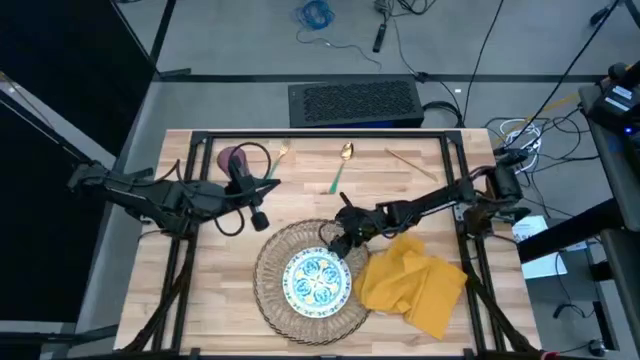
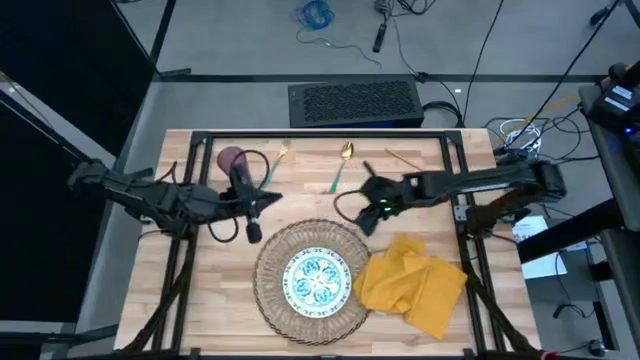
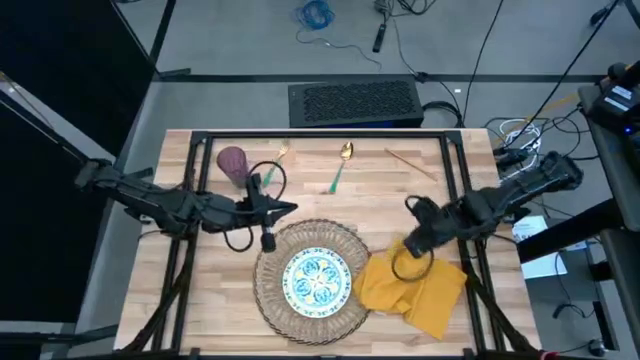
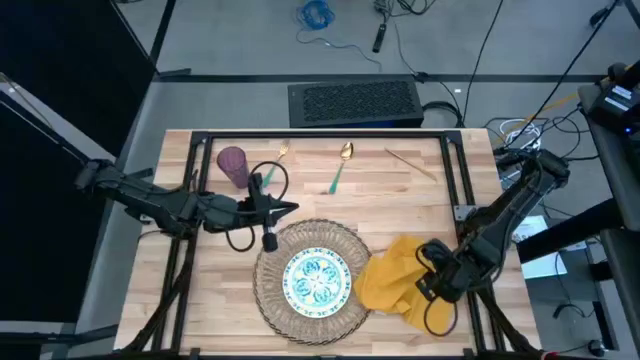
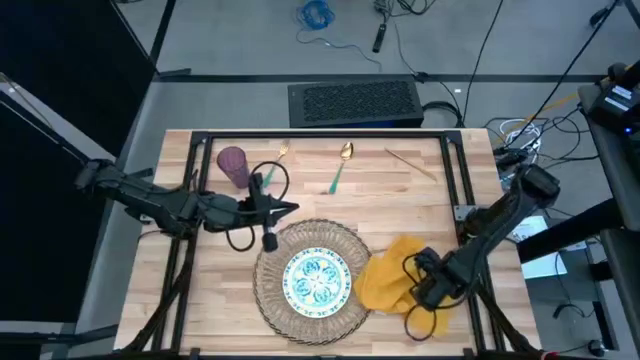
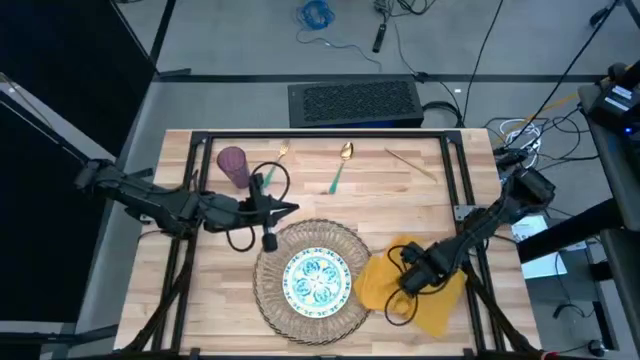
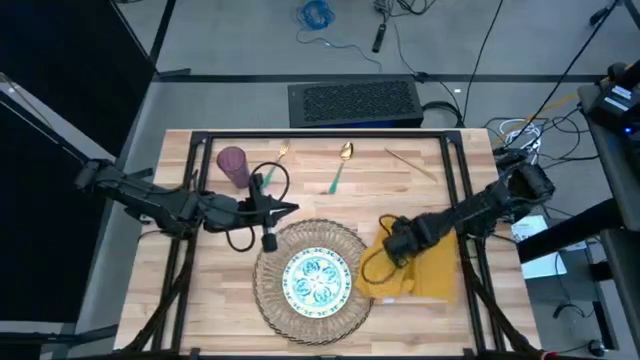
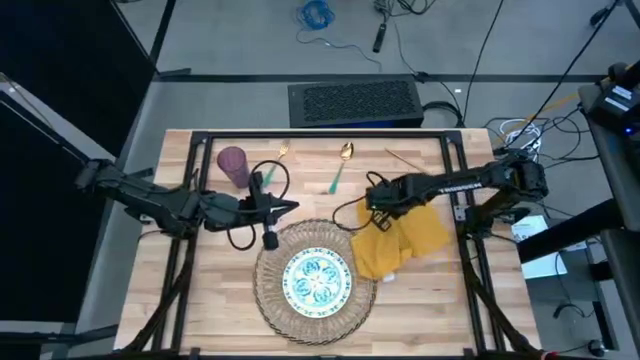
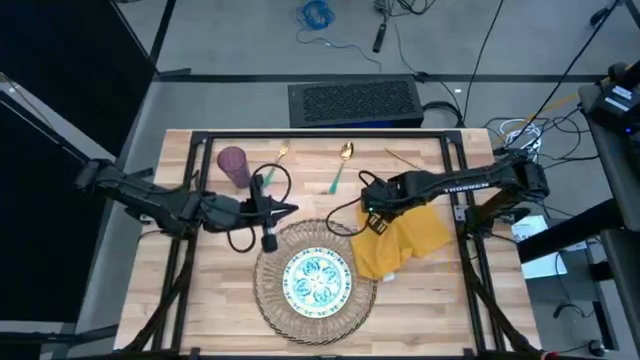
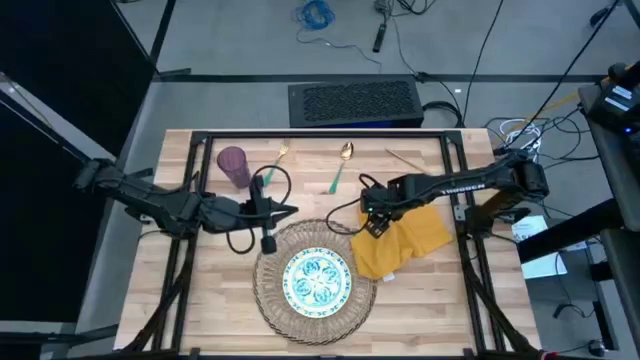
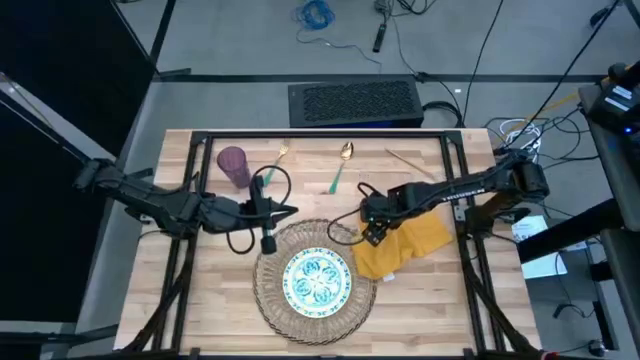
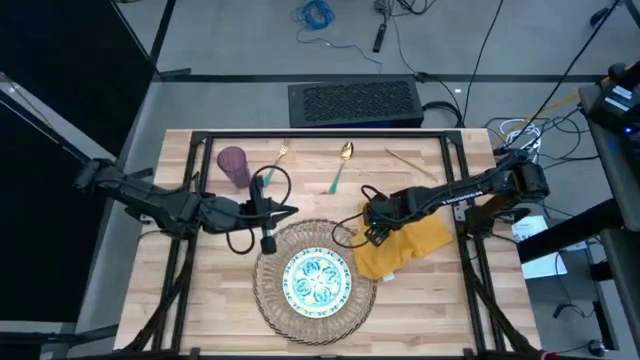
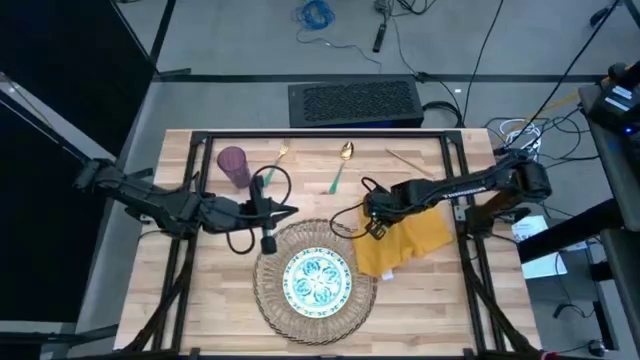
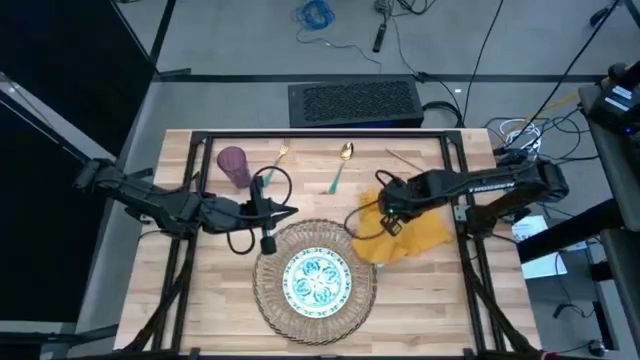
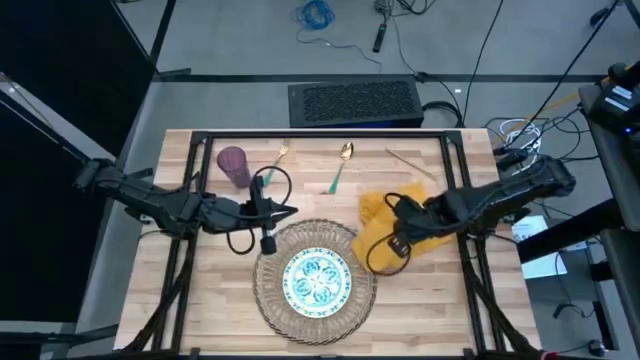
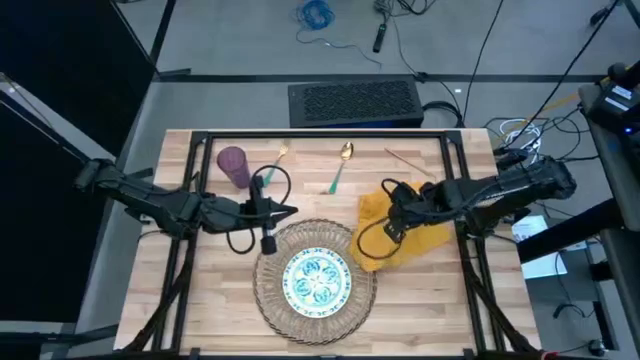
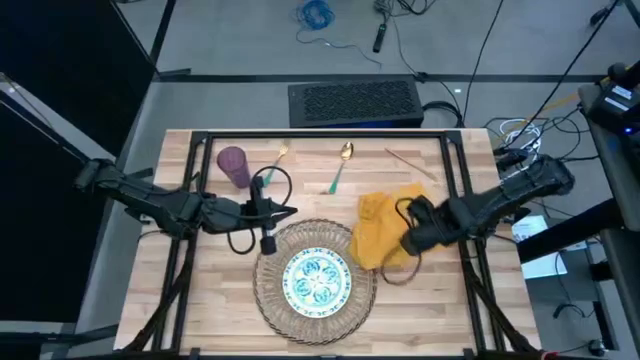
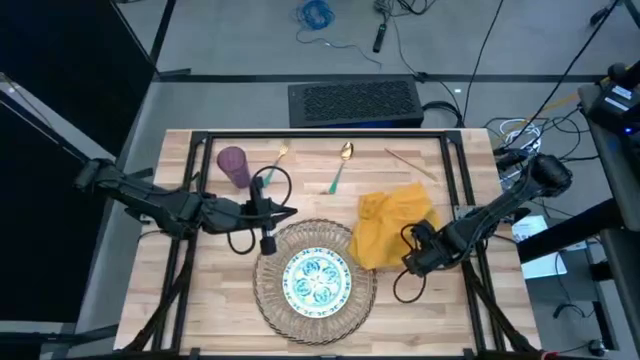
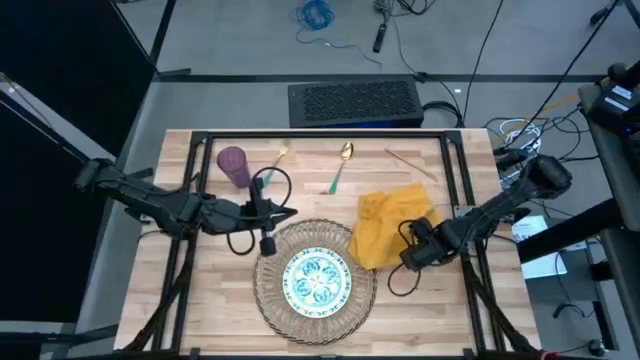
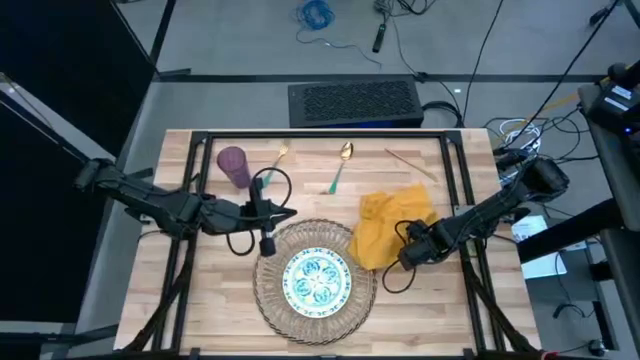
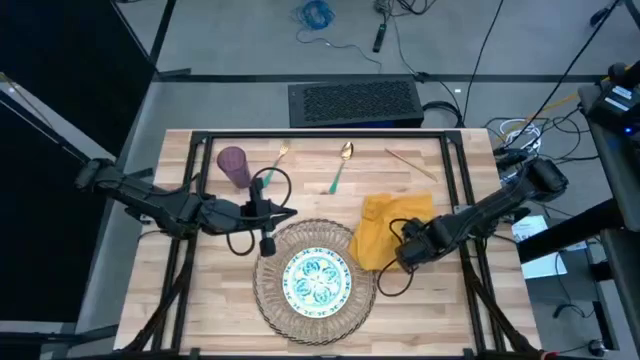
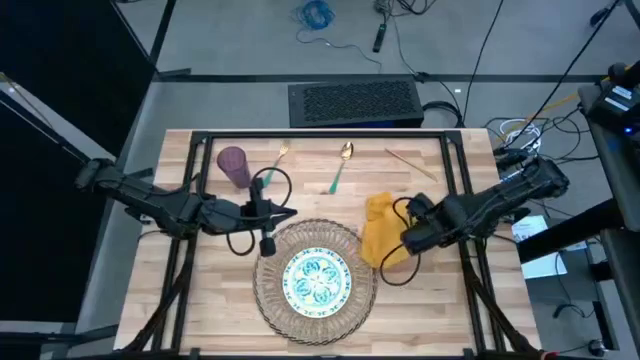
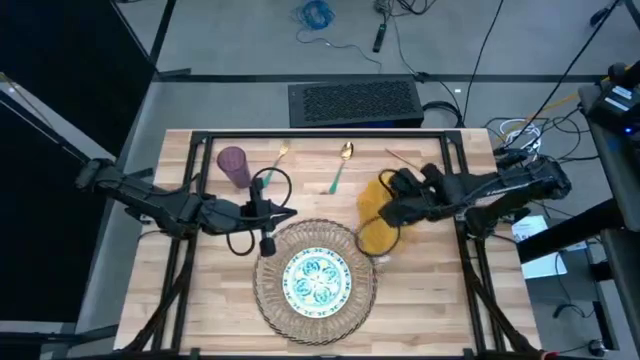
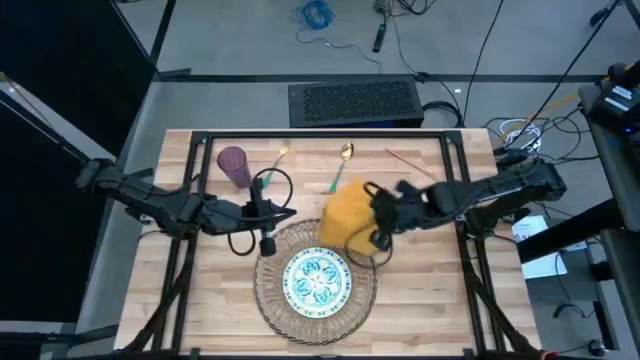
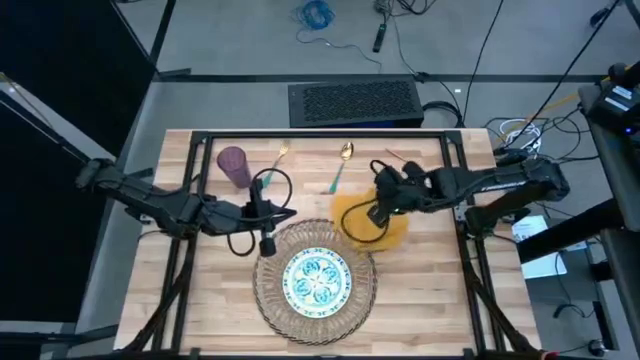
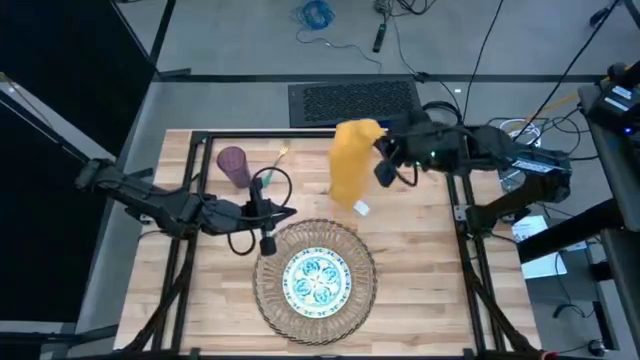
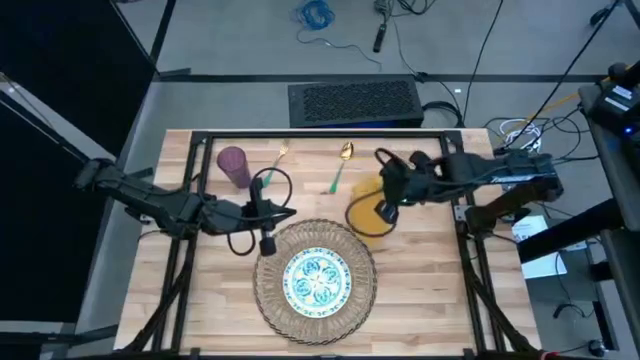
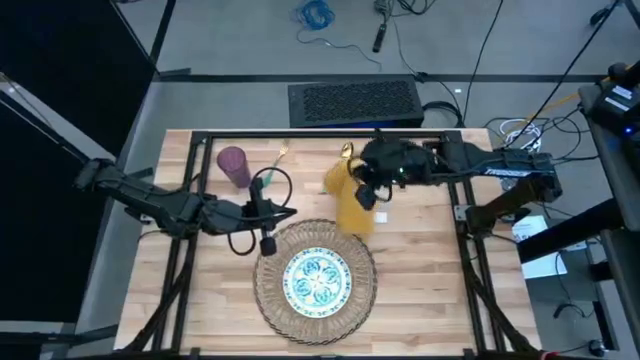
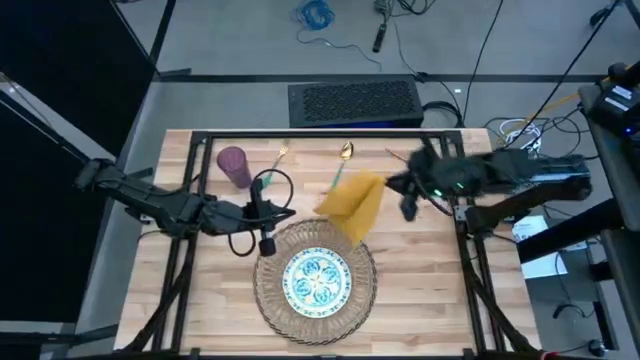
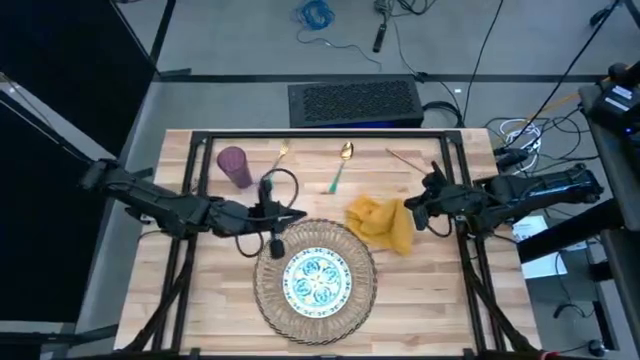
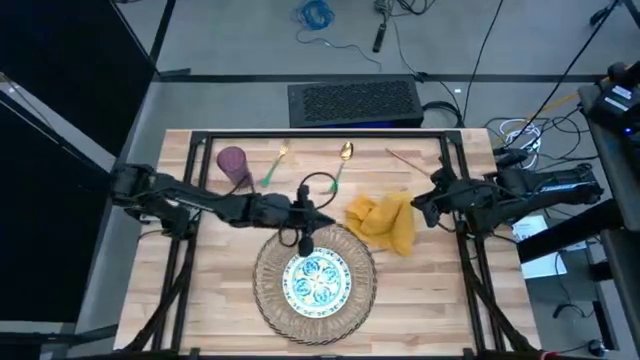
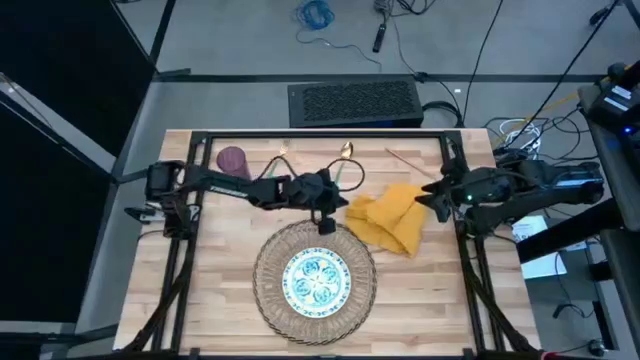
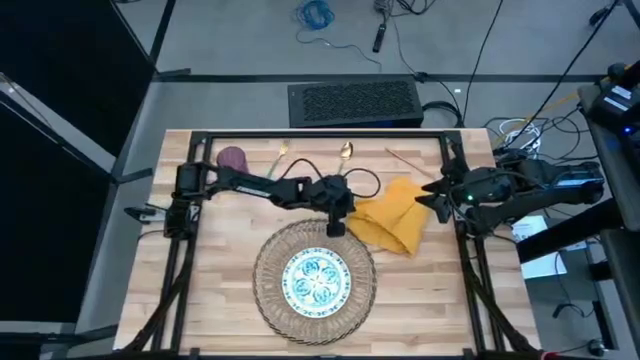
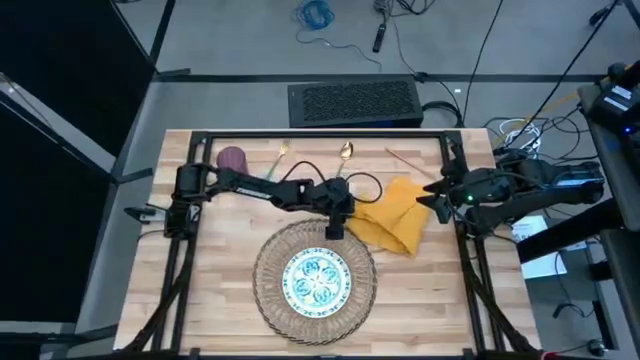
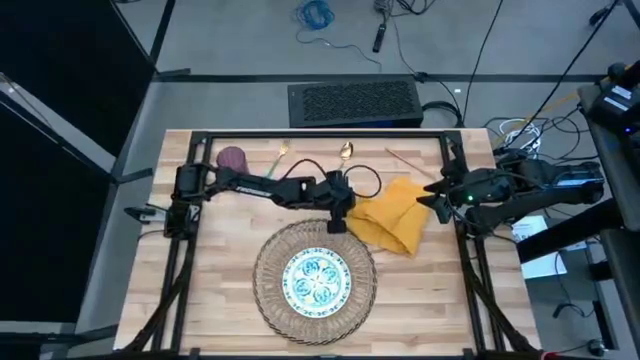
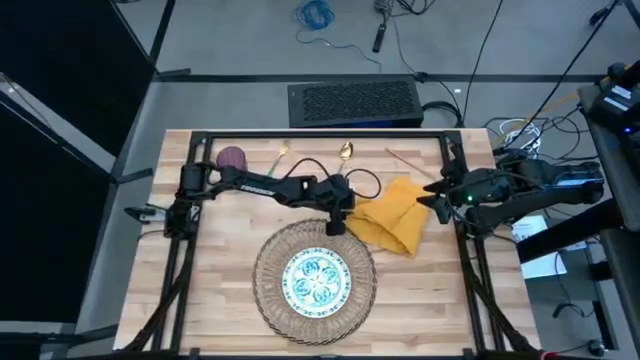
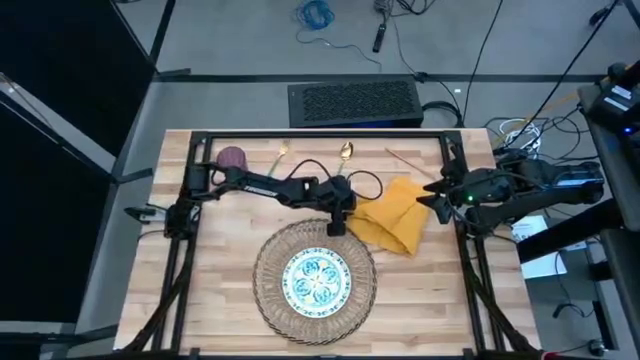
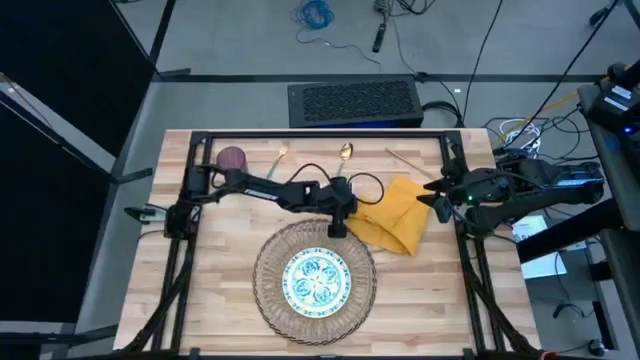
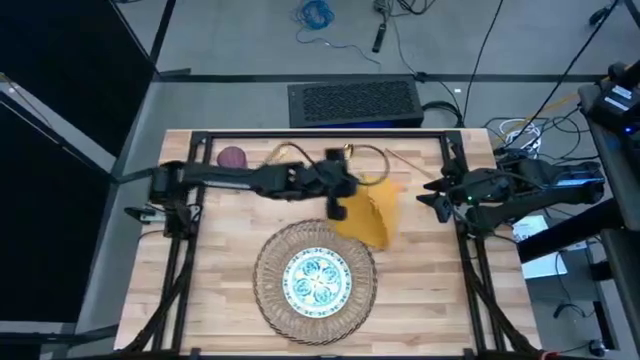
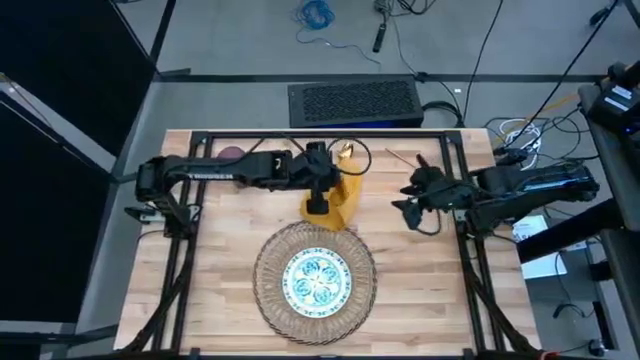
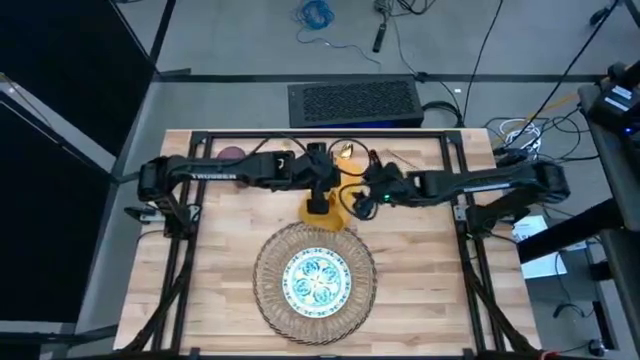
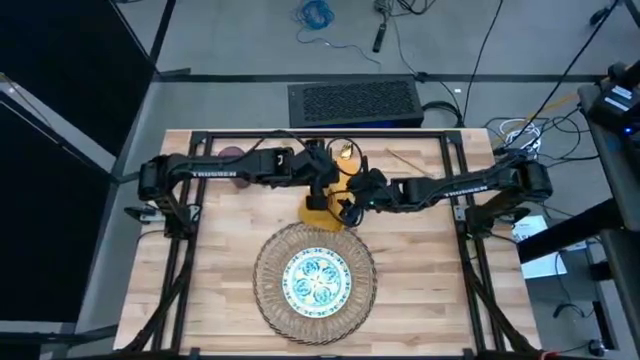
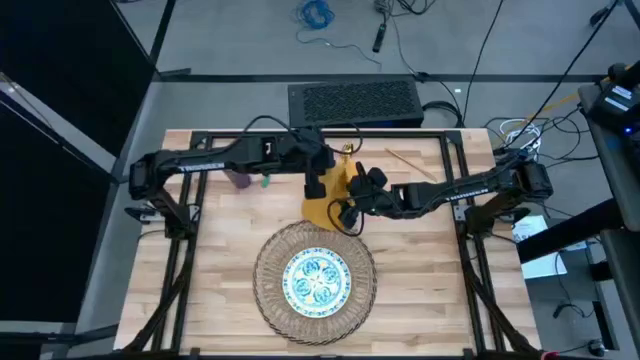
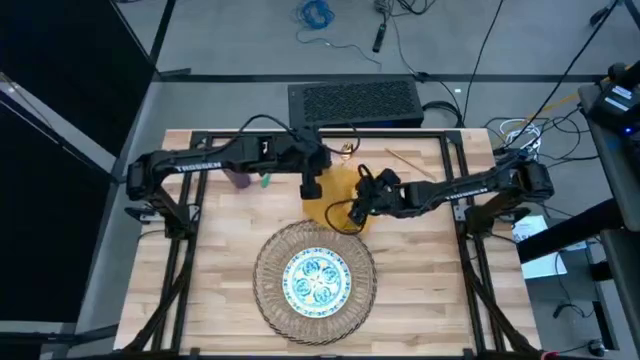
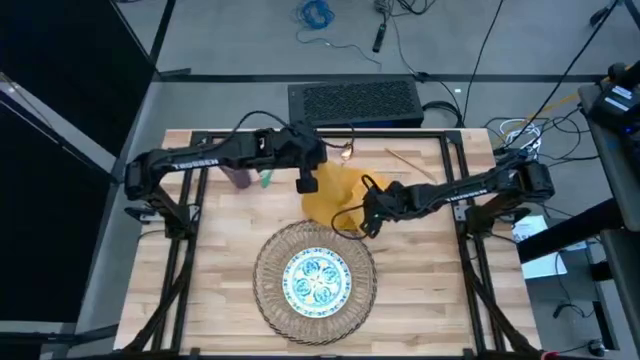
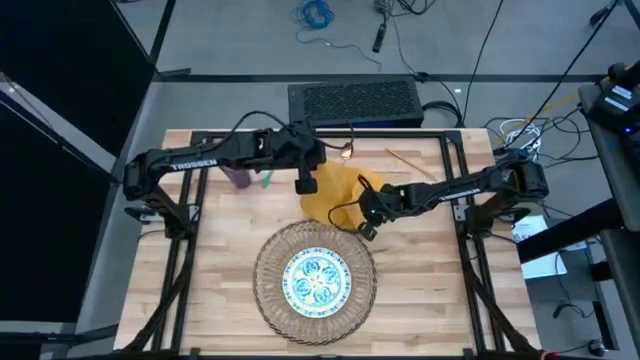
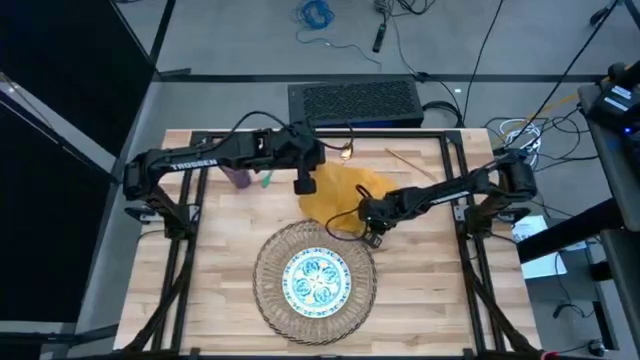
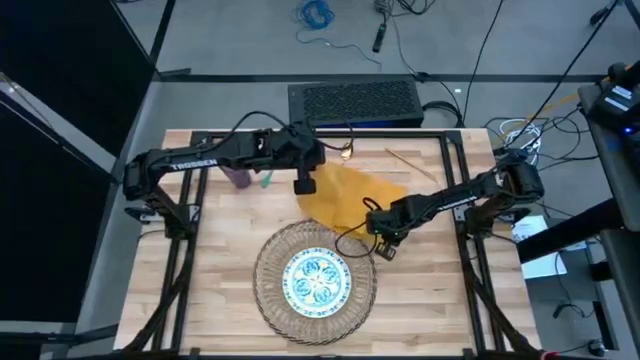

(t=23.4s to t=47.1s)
Task: Set table place
Fold the yellow table napkin
